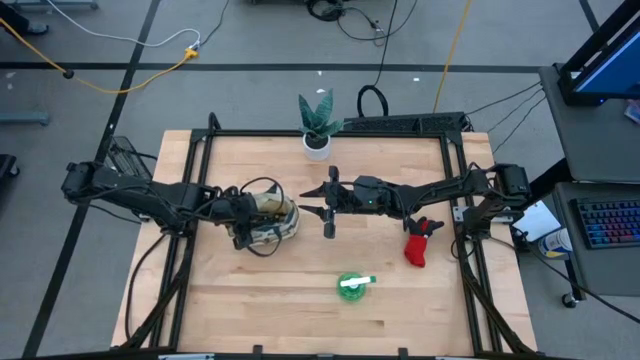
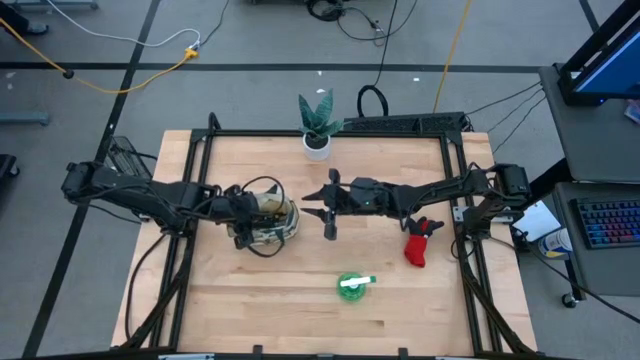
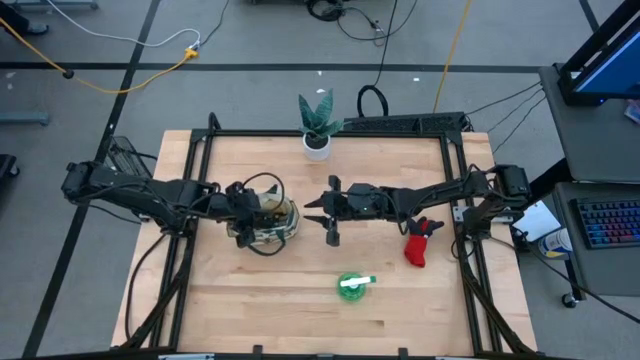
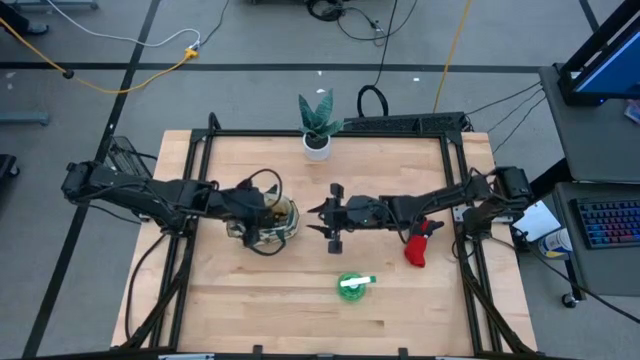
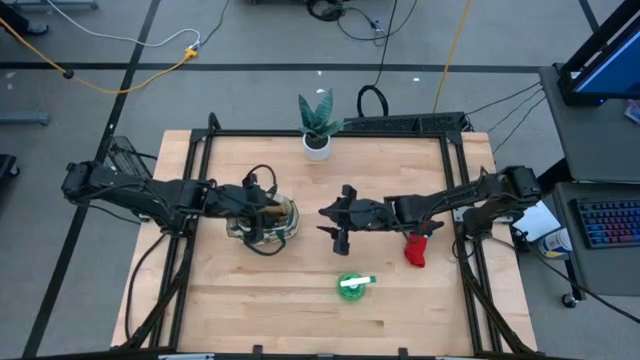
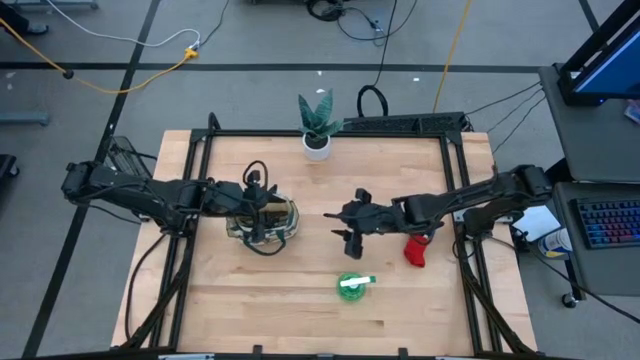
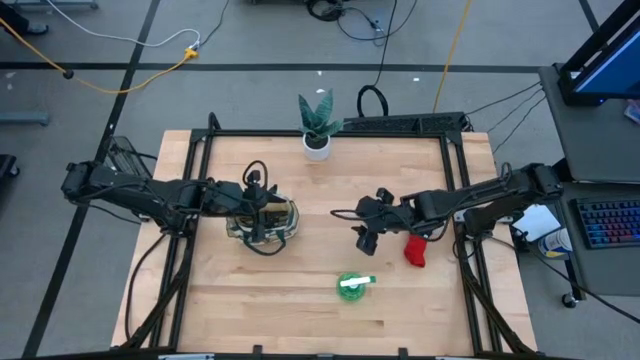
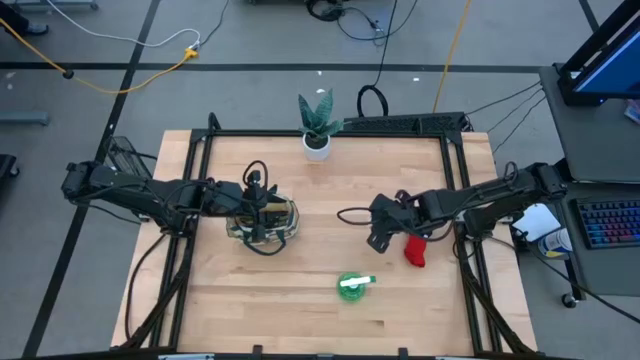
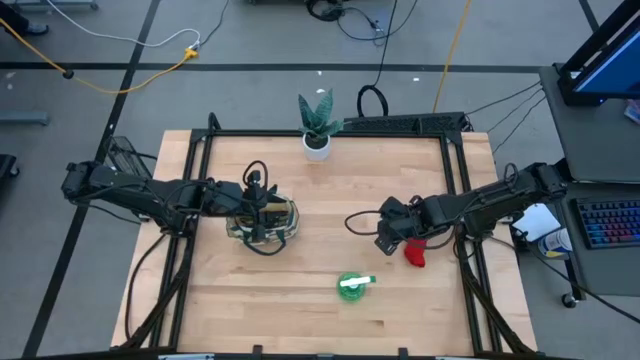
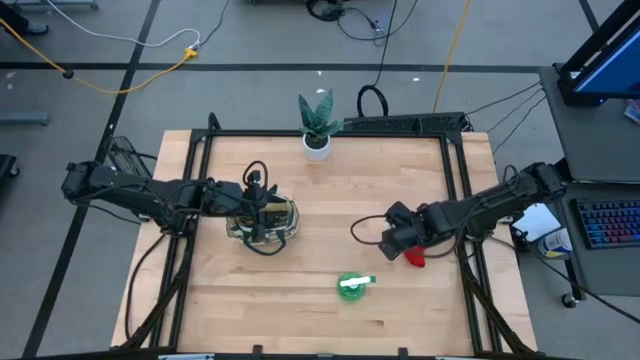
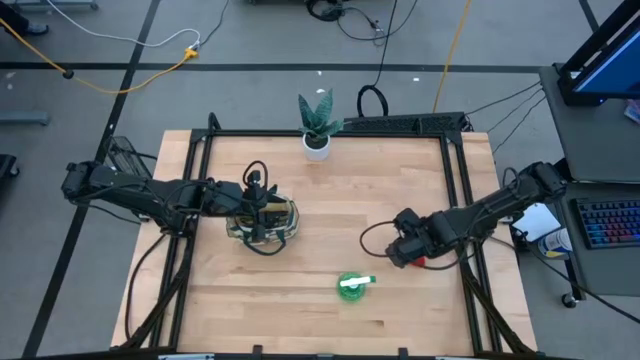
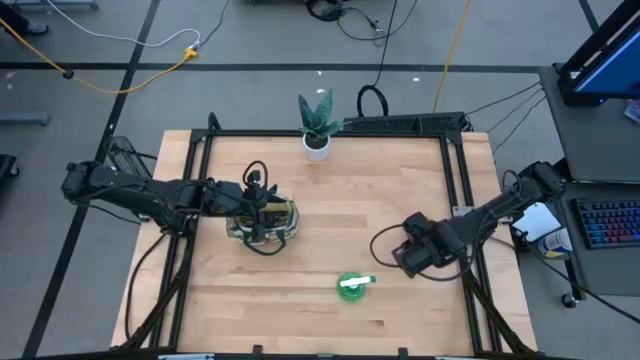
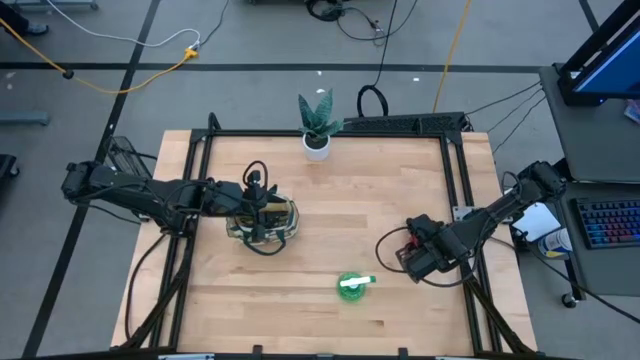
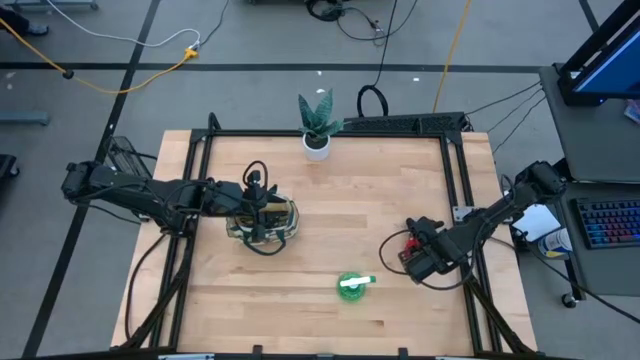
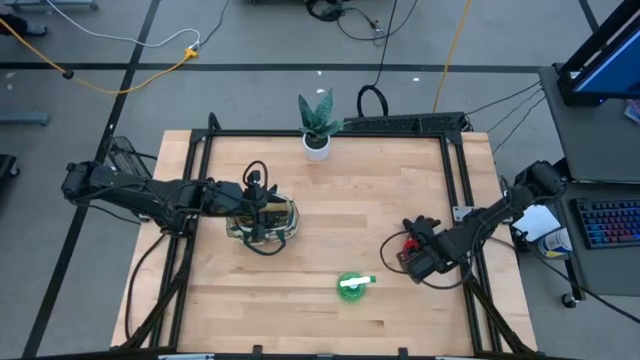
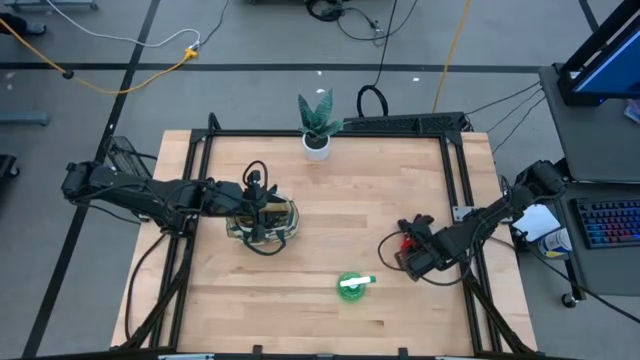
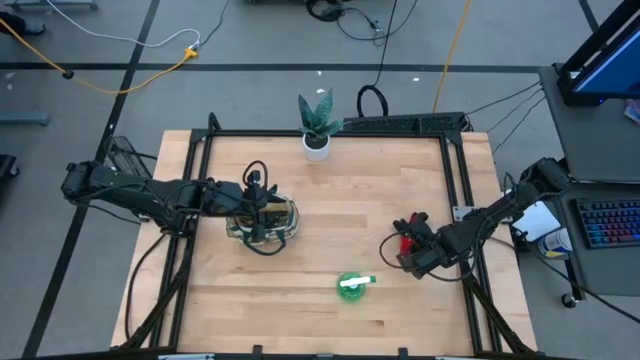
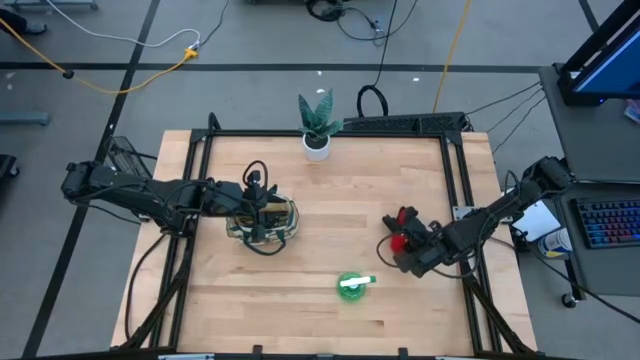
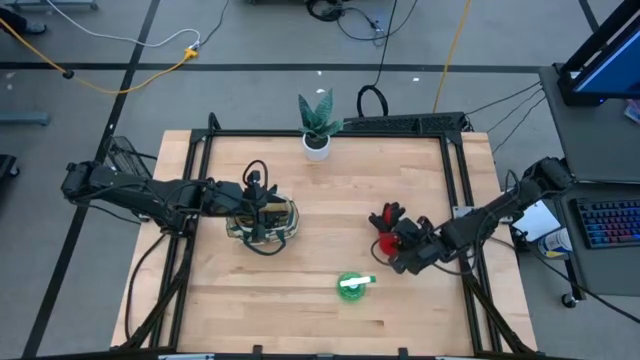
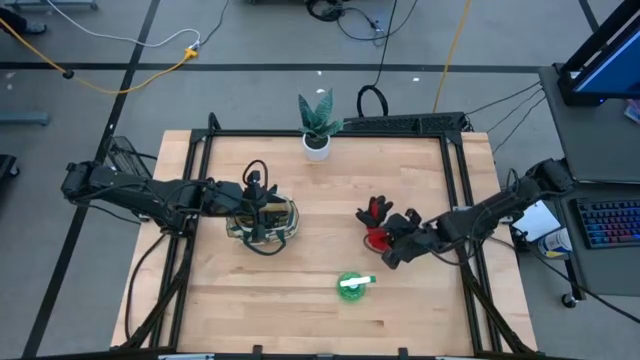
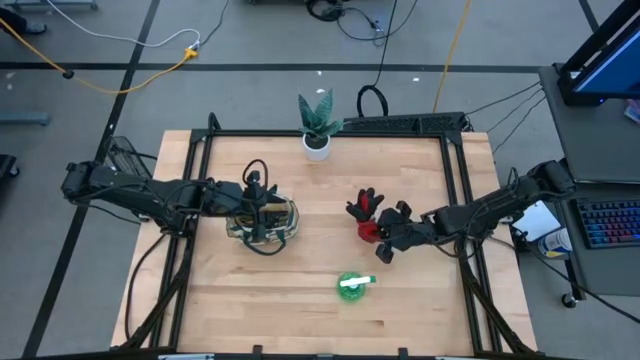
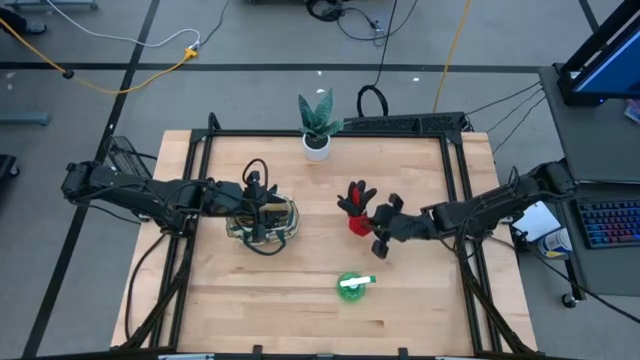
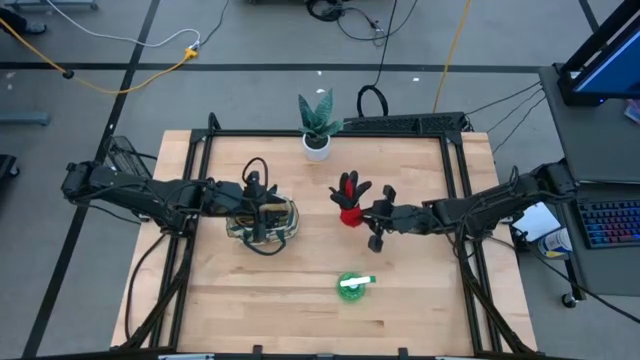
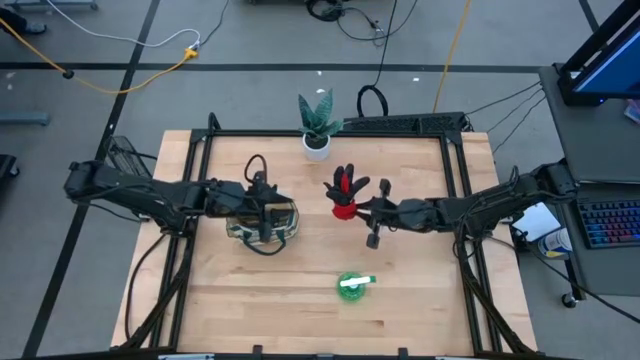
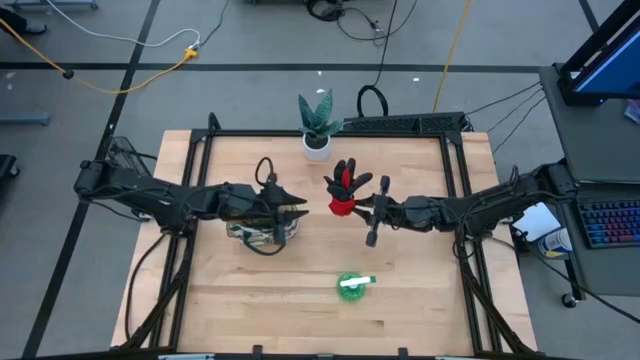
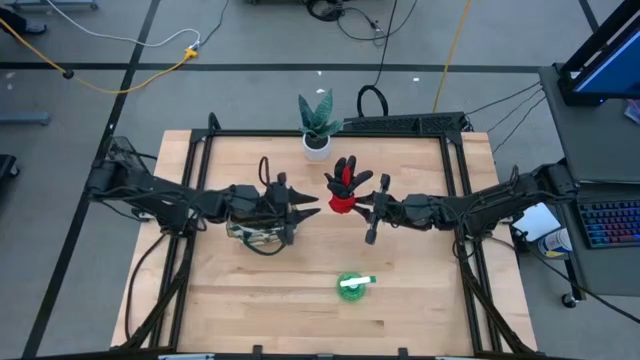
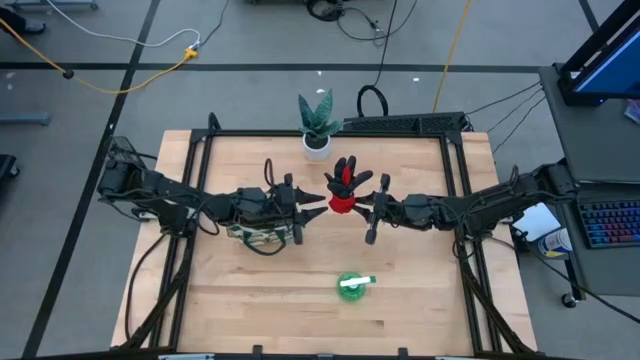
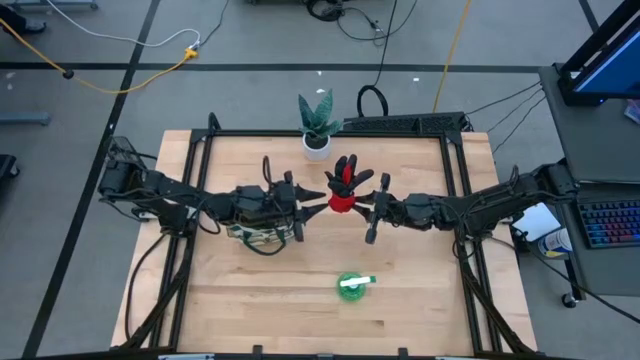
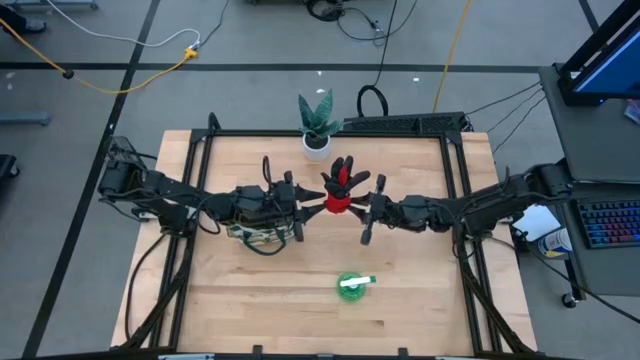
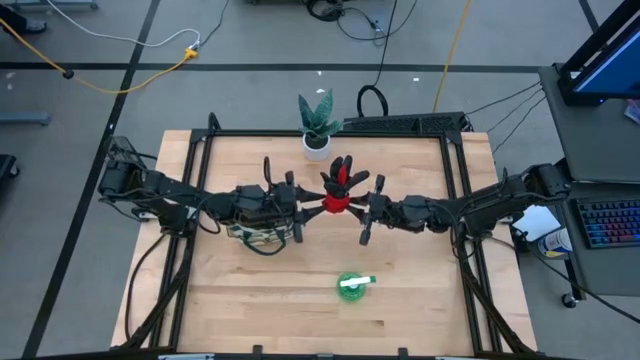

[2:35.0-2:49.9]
Task: Pick & Place Garden tools in Gardening bag
Put the red gloves into the white gardening bag

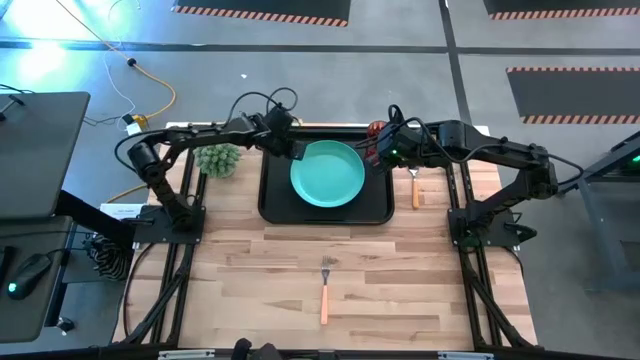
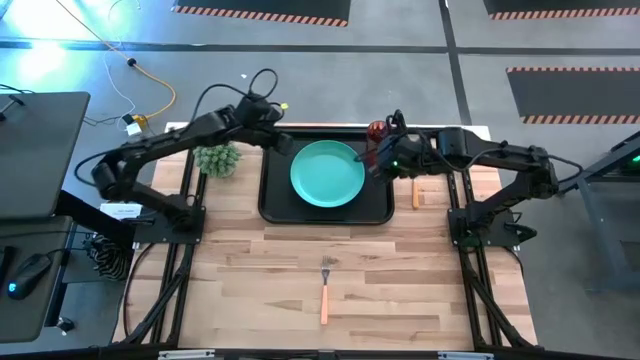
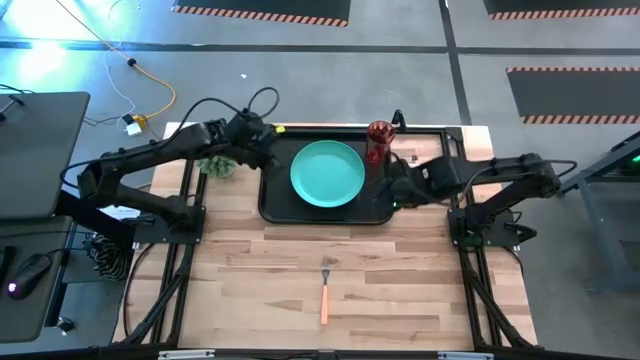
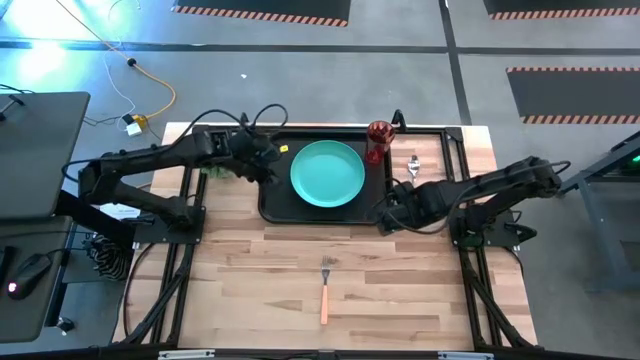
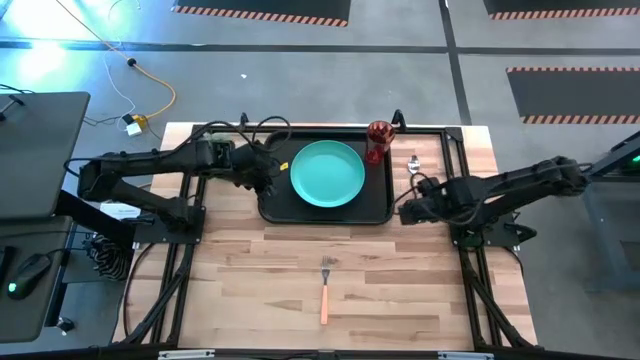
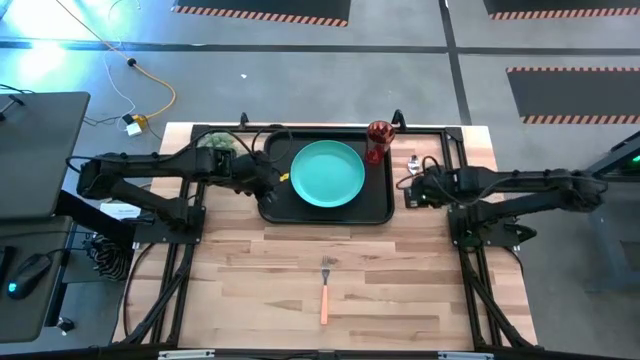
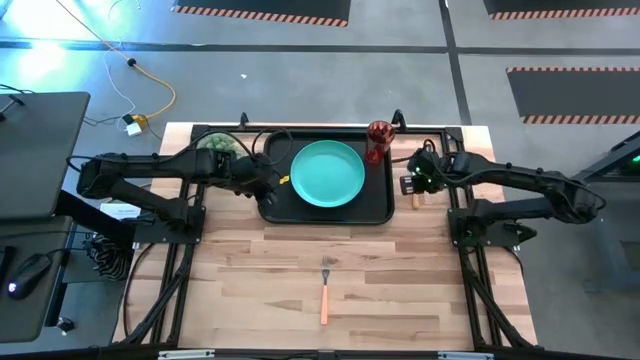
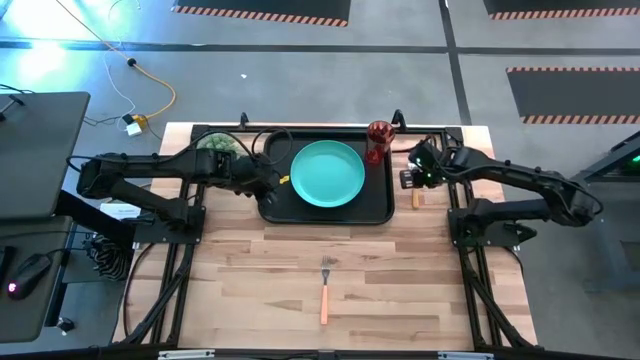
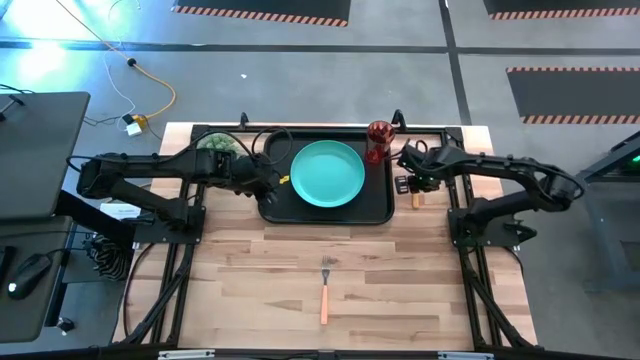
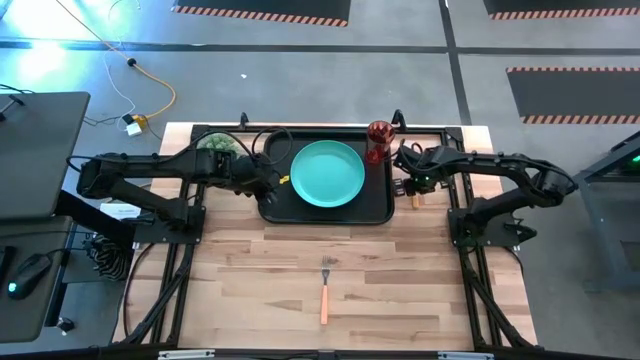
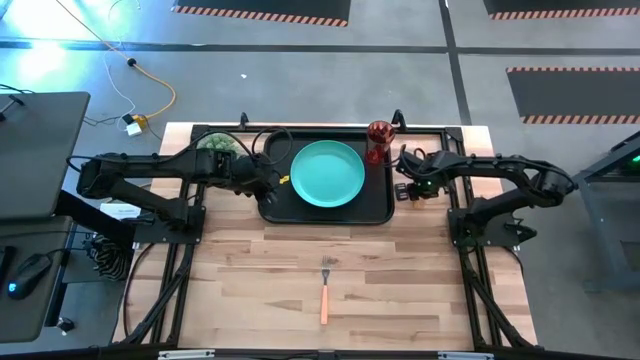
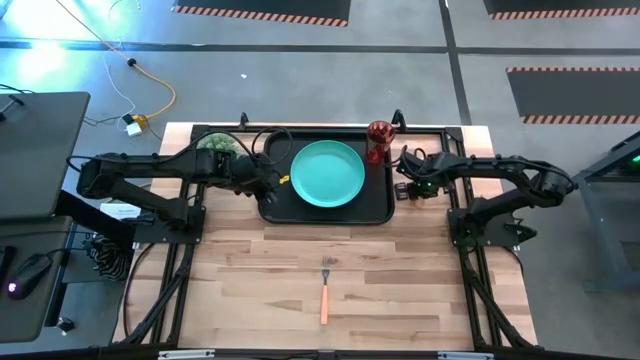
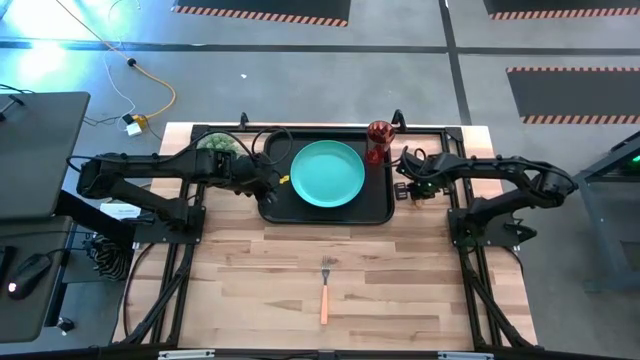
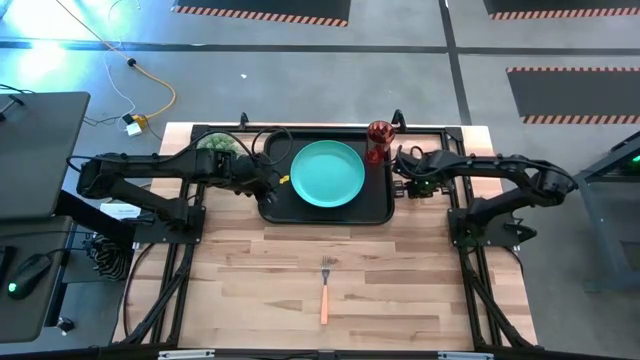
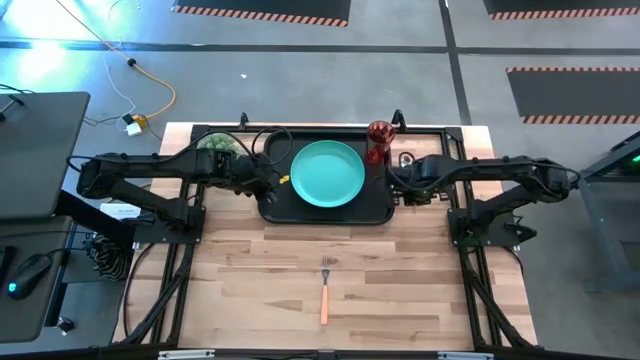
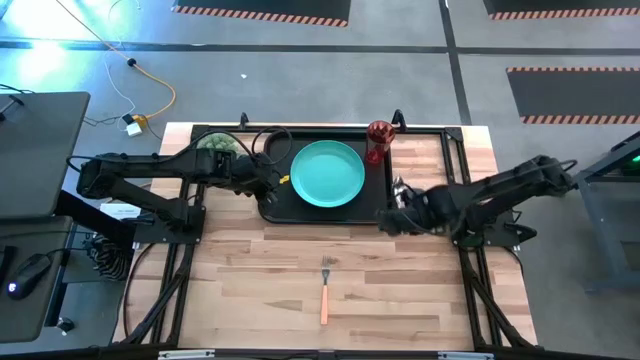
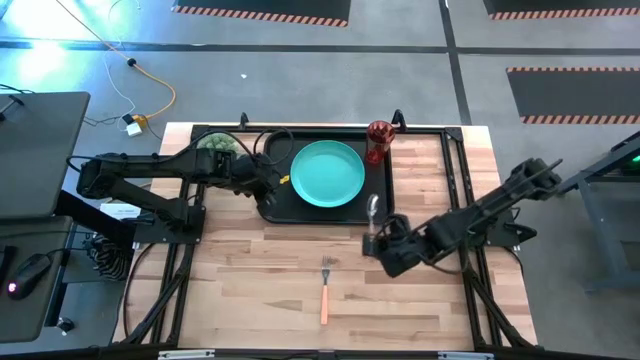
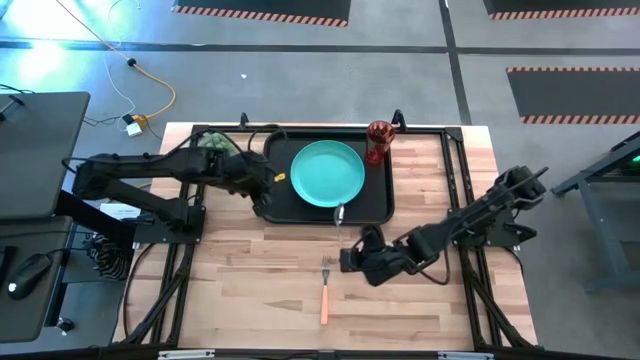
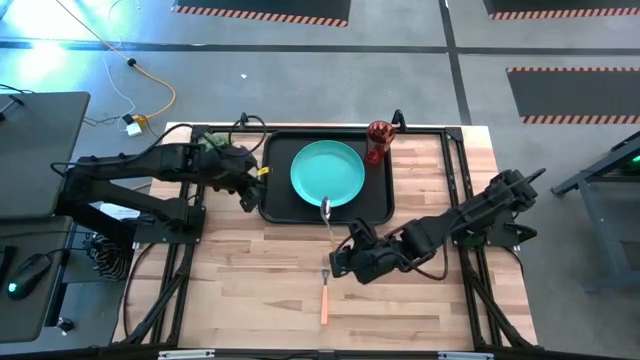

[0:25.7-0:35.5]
Task: Pick and place plate/cup/fork/spoon on tray
Put the yellow spoon on the black tray to the left of the blue plate
